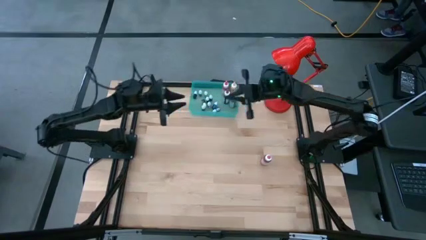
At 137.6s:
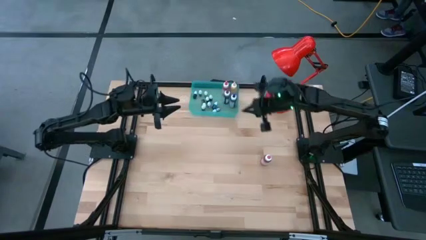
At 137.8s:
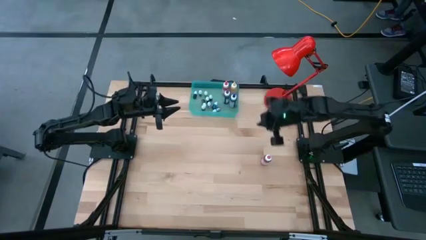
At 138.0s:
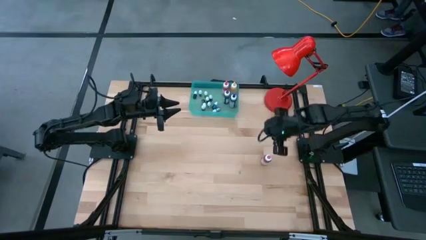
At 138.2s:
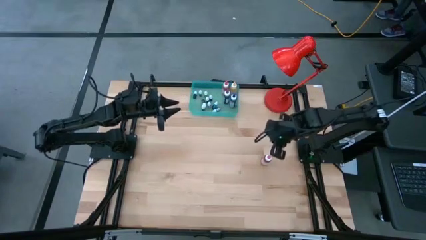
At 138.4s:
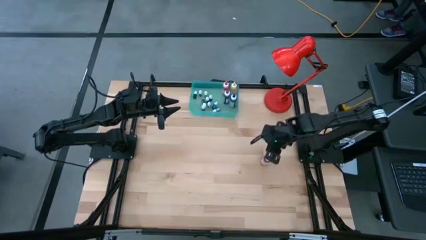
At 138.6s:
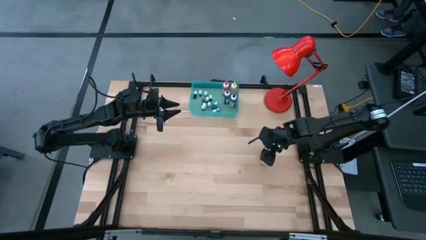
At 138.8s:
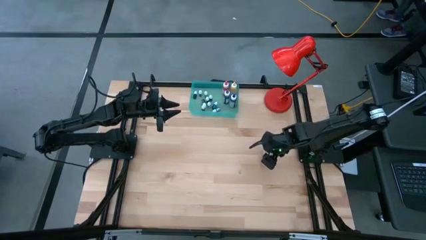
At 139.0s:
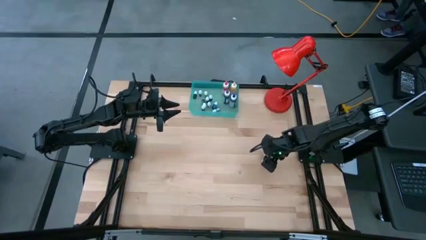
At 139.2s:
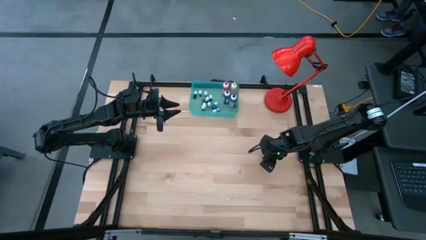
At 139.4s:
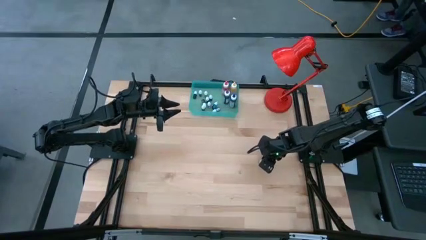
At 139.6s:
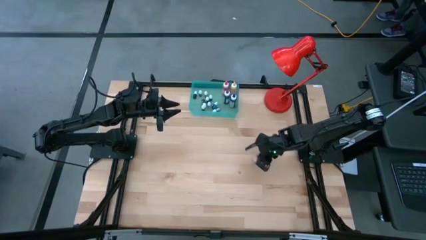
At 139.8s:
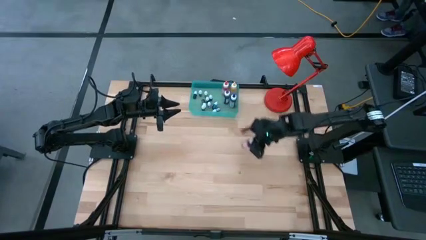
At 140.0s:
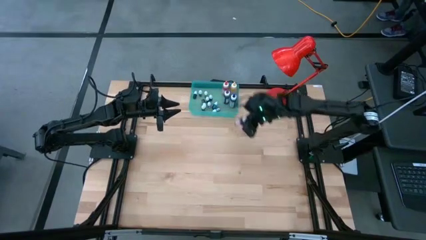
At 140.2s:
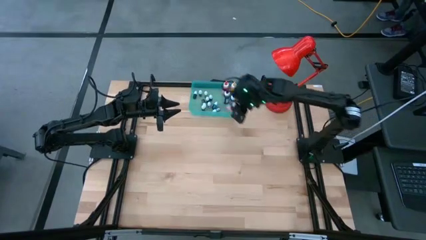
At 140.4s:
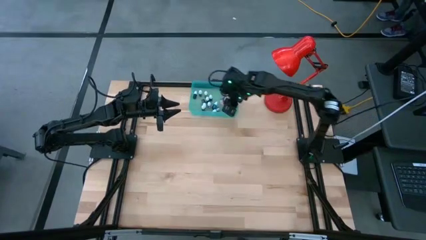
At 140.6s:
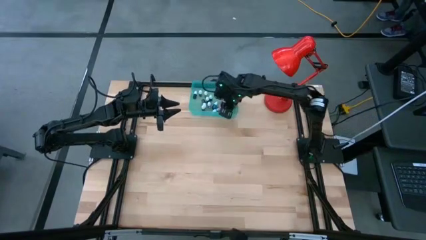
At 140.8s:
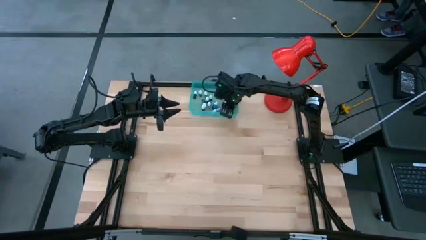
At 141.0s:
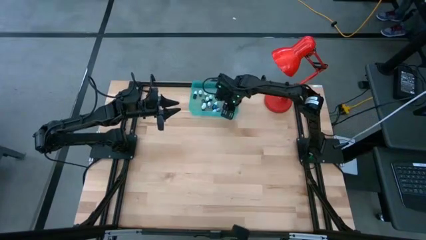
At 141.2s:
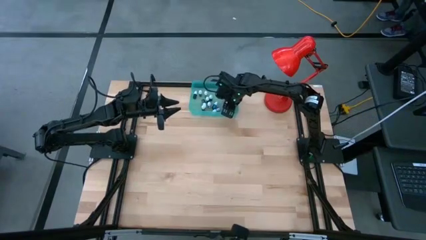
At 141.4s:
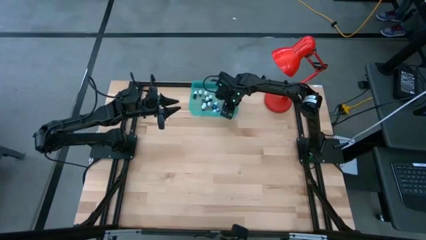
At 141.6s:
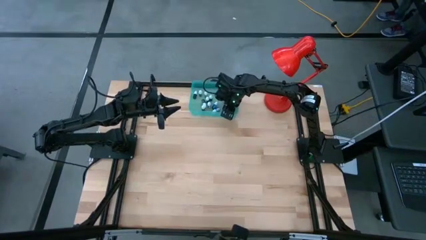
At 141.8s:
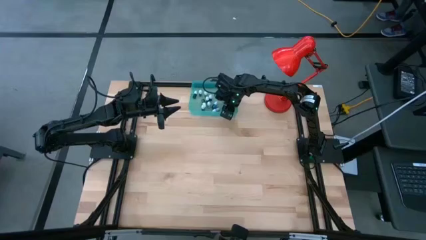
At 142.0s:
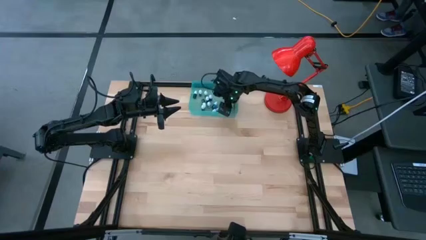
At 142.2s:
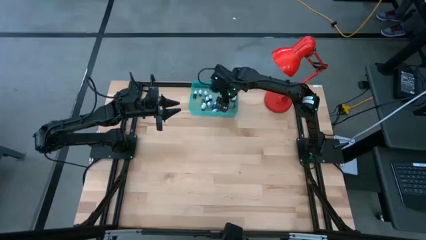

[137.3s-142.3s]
Task: Pick & Place food coloring
Put the pink food coloring bottle into the bin

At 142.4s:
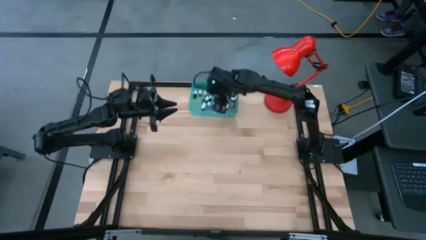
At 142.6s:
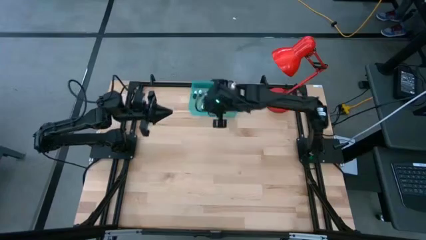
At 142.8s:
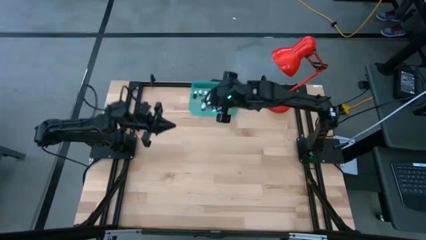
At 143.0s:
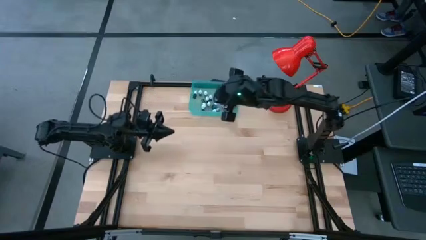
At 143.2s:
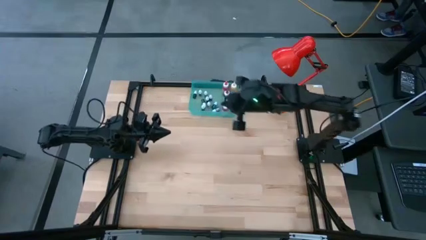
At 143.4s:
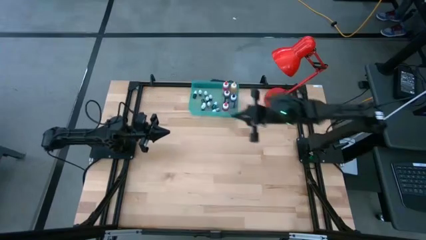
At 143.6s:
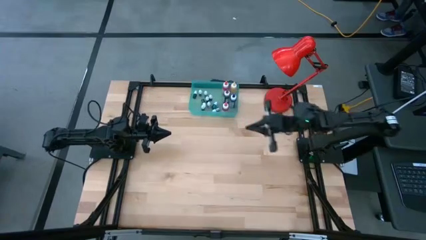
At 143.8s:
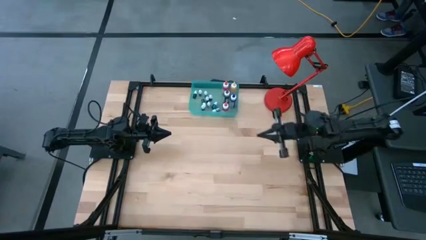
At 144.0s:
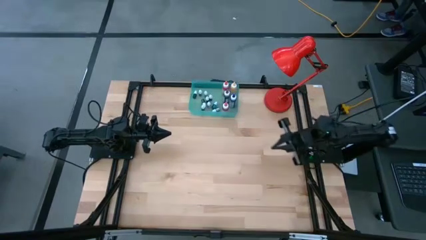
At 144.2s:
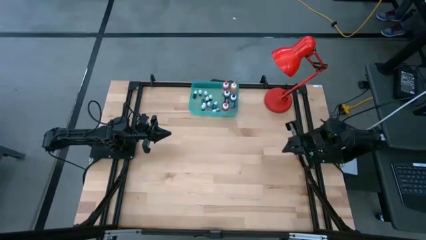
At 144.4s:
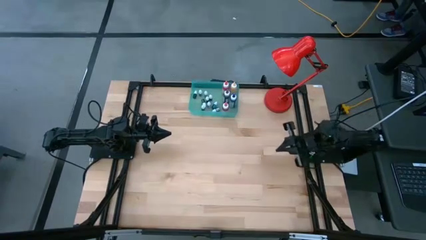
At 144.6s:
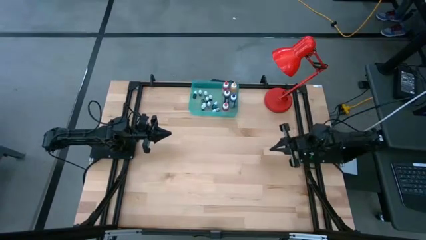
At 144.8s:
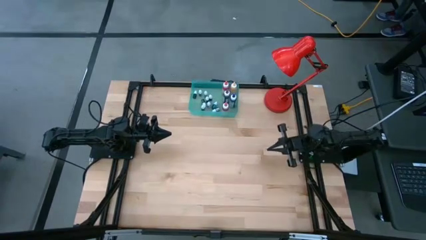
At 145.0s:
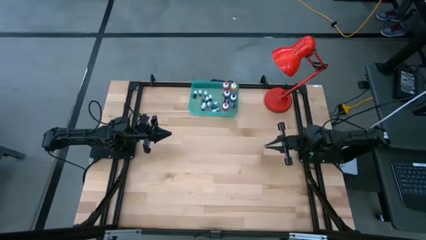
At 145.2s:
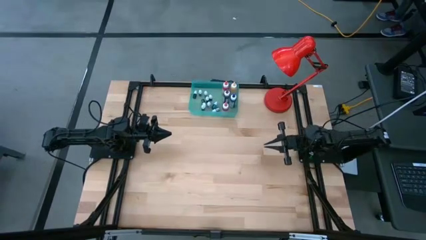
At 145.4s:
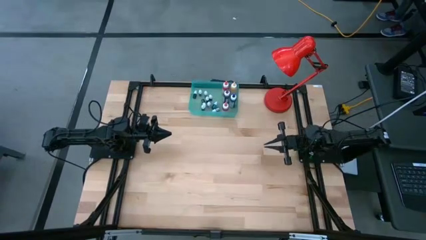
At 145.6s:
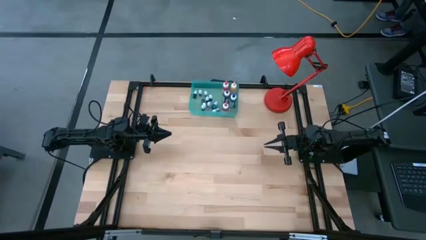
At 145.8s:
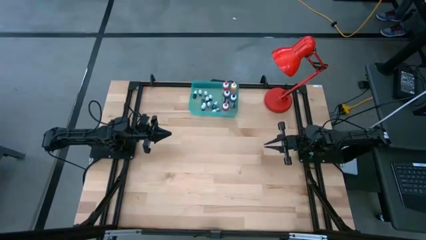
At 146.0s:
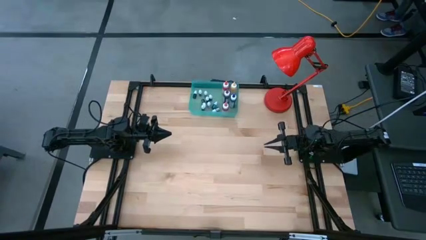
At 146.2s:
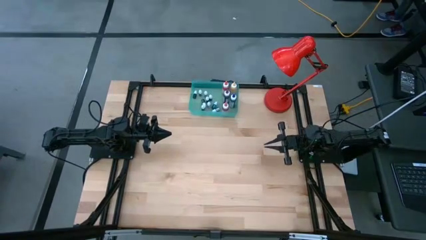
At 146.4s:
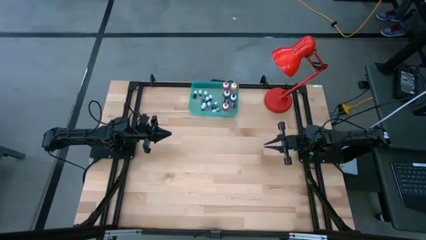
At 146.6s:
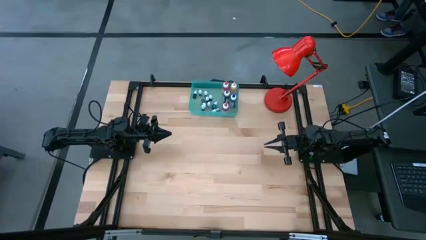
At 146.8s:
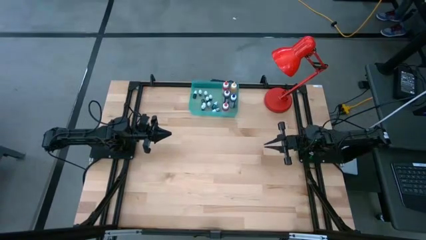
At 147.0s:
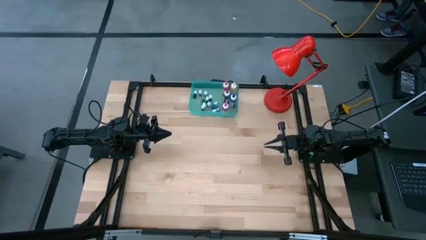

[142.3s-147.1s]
Return to Home Position

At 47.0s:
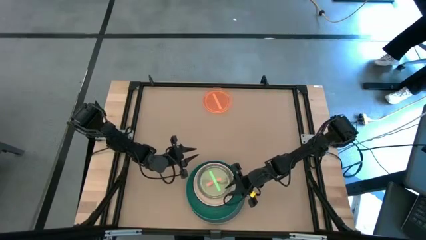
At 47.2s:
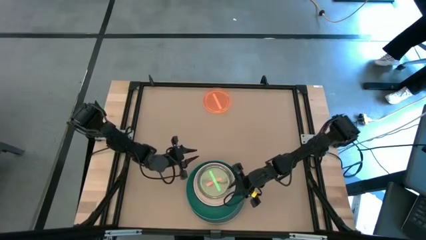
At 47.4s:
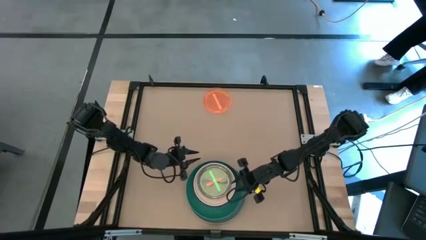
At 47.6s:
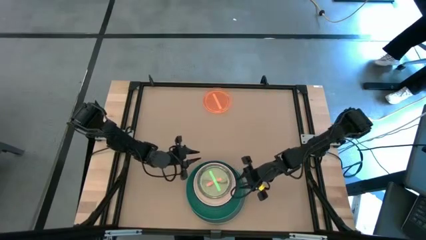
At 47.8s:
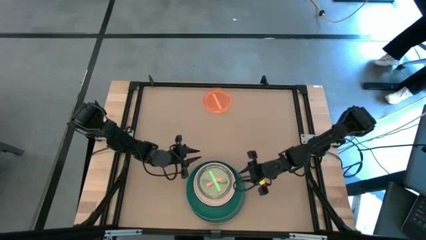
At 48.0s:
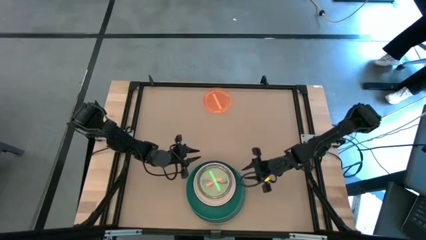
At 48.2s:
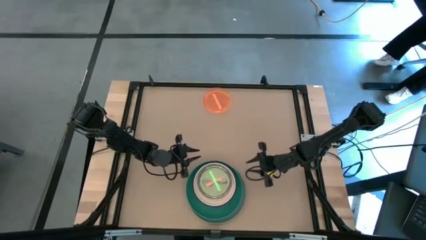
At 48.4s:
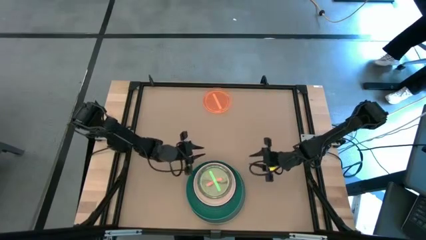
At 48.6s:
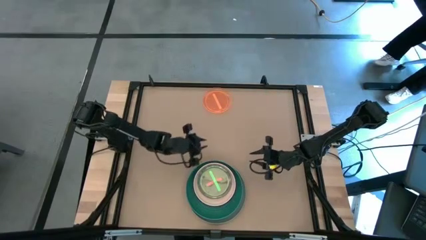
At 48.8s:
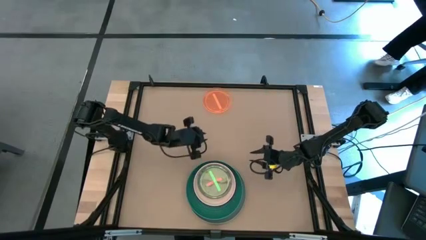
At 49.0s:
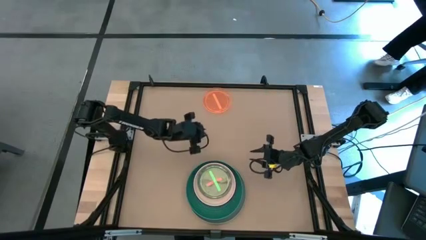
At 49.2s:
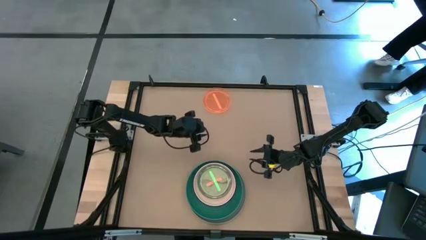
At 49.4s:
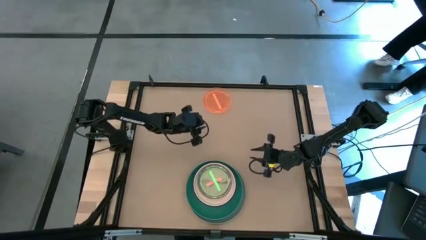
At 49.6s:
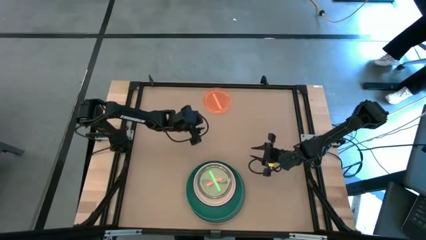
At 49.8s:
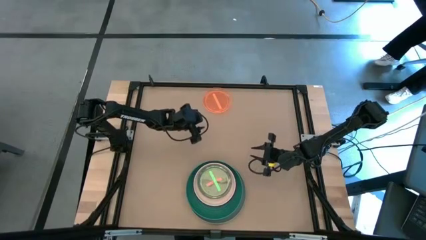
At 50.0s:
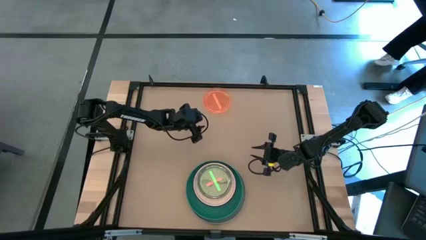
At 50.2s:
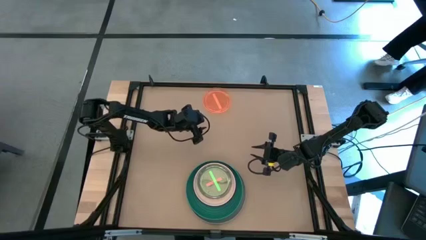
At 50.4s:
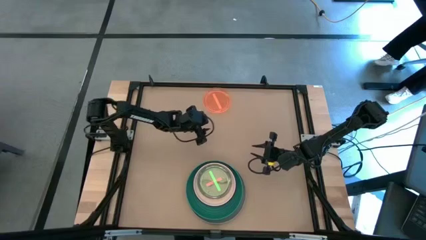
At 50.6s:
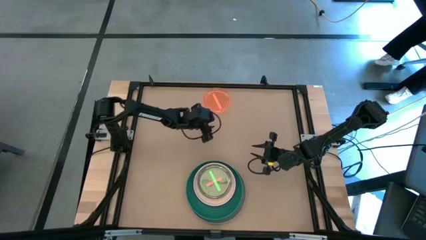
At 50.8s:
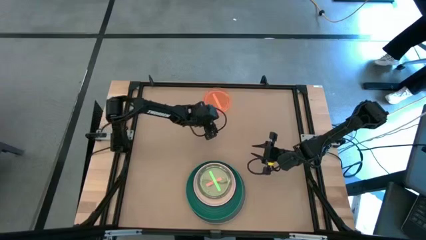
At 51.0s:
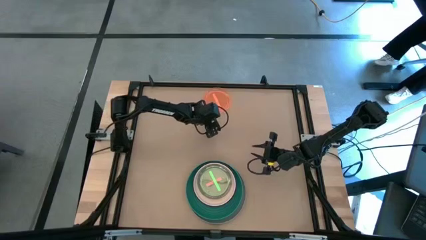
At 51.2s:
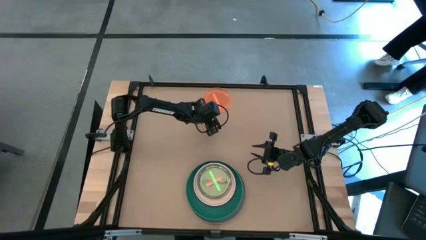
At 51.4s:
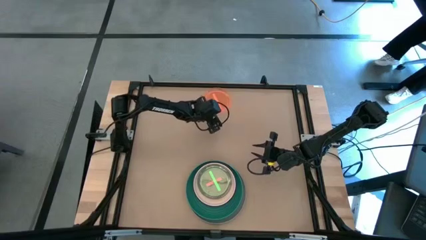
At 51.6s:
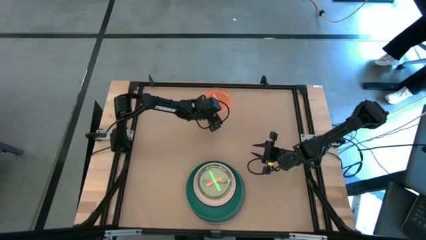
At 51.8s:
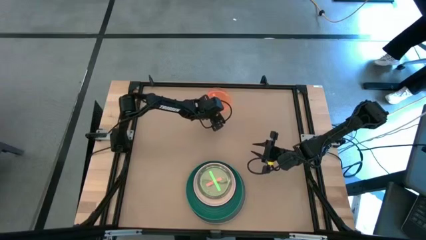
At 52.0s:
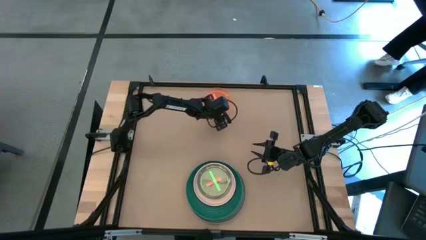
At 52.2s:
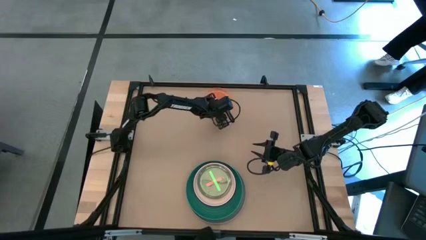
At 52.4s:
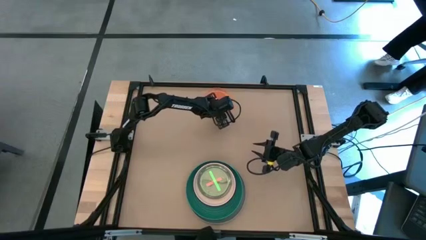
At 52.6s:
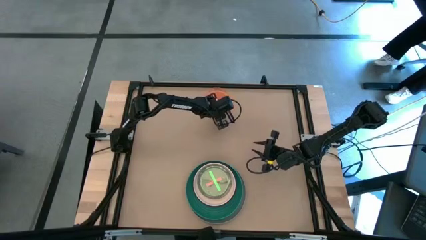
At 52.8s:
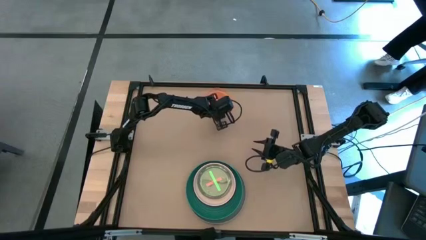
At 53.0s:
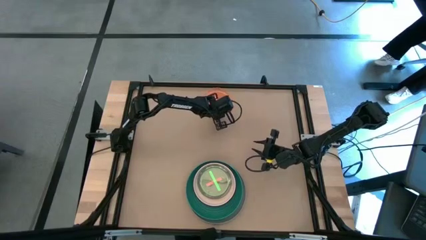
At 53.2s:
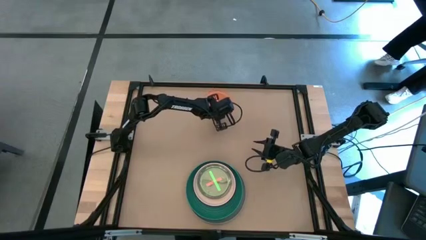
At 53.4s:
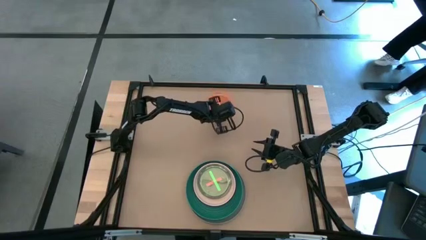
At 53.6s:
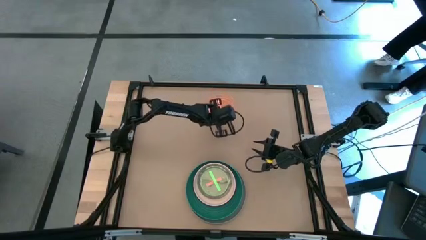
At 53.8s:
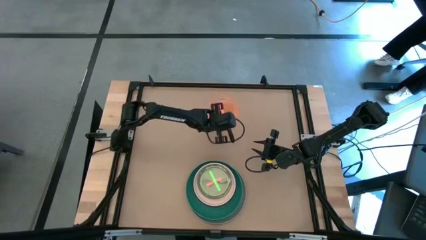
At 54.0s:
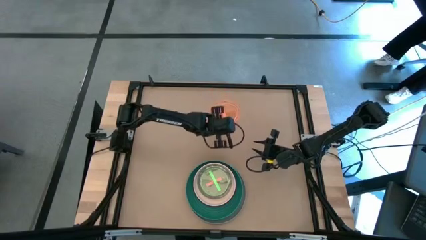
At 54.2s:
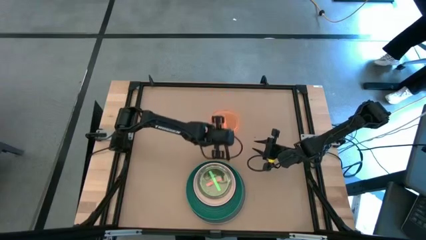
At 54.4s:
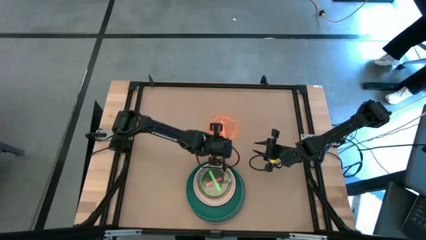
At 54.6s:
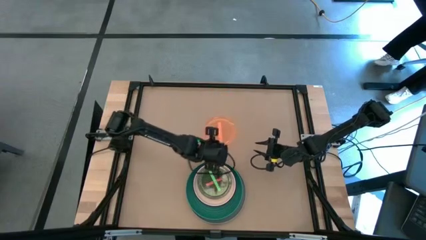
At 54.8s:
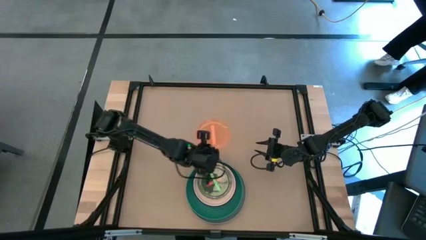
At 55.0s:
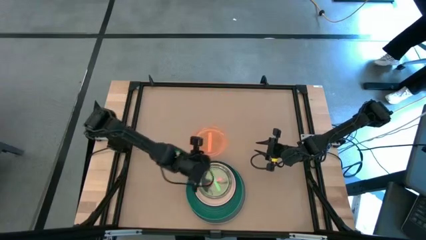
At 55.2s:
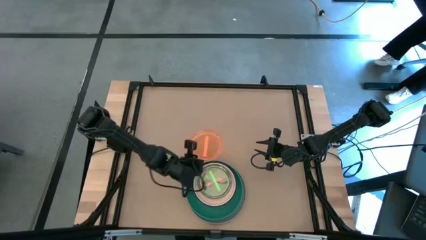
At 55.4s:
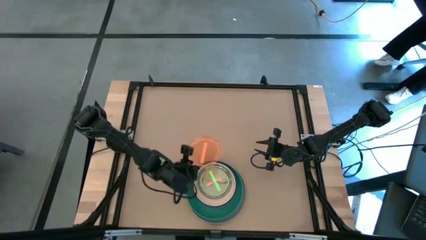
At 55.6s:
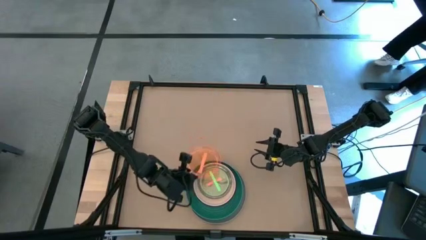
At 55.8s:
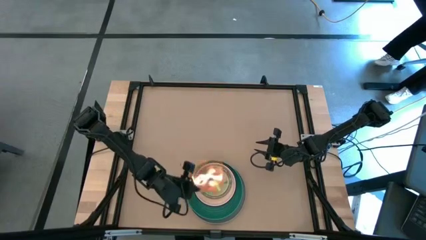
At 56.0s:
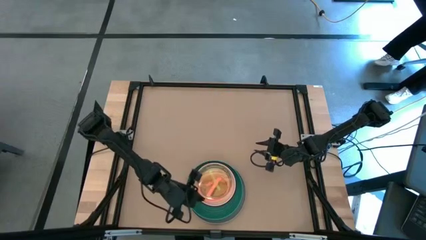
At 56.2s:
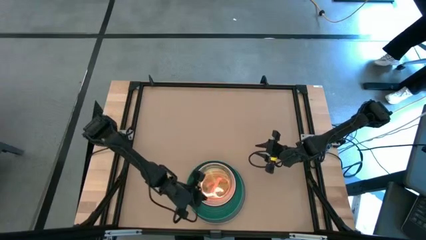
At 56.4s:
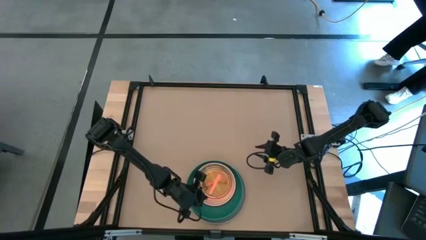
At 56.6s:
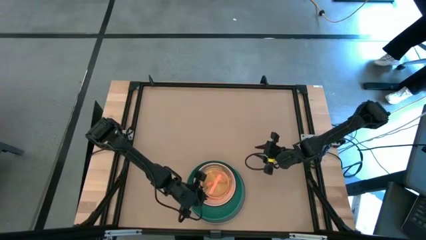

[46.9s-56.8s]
Task: Stack plastic plates
Stack the orange transparent plate on top of the green transparent plate
